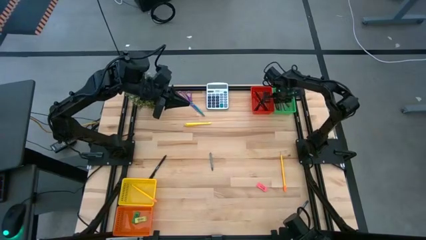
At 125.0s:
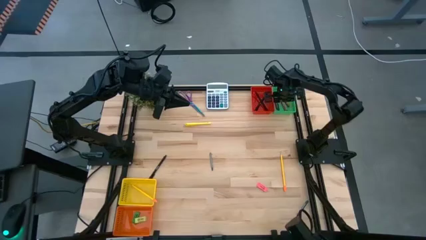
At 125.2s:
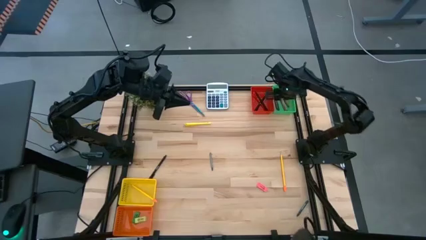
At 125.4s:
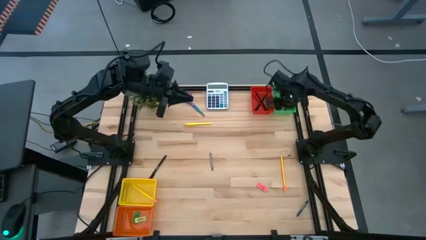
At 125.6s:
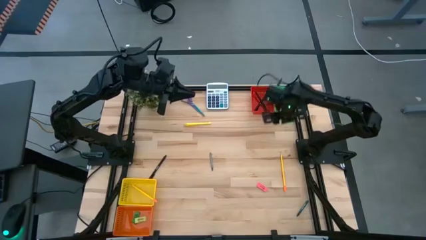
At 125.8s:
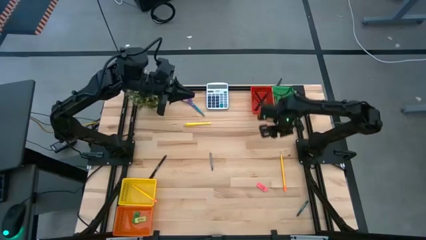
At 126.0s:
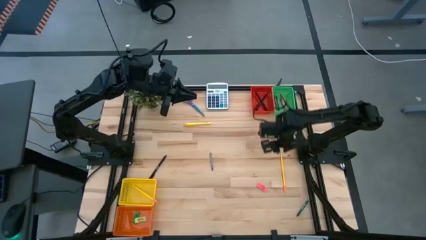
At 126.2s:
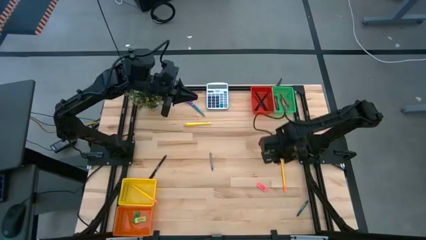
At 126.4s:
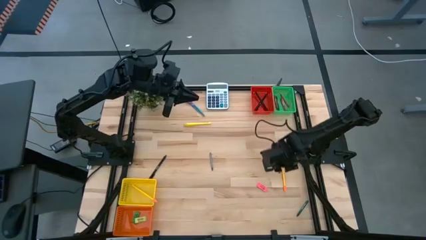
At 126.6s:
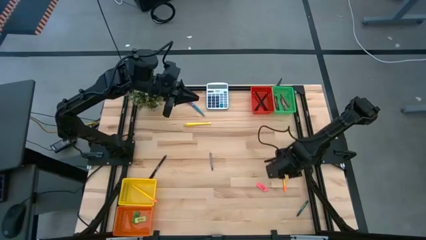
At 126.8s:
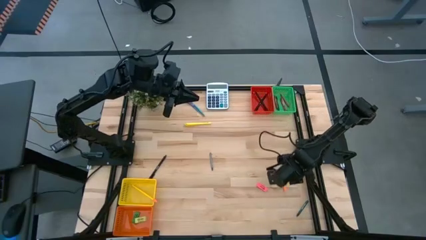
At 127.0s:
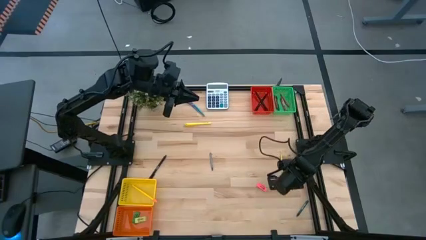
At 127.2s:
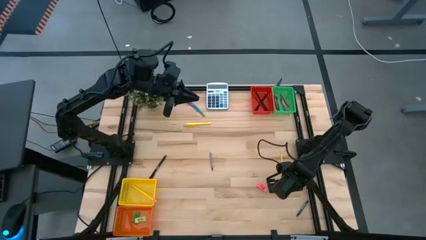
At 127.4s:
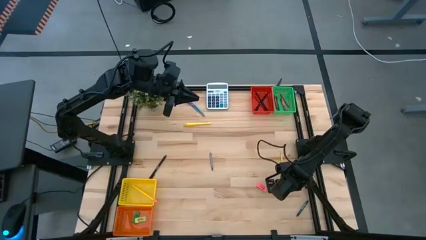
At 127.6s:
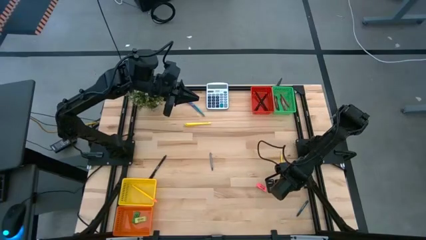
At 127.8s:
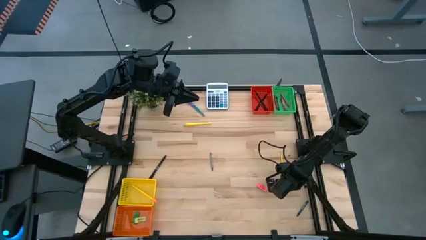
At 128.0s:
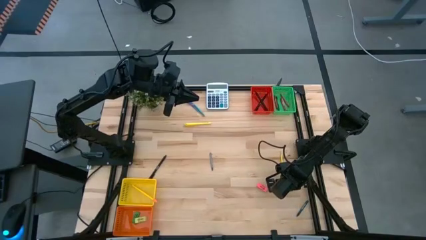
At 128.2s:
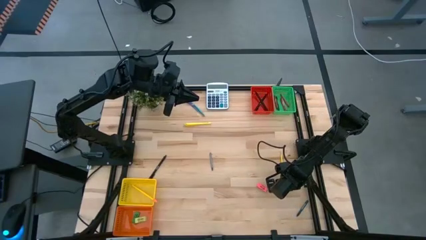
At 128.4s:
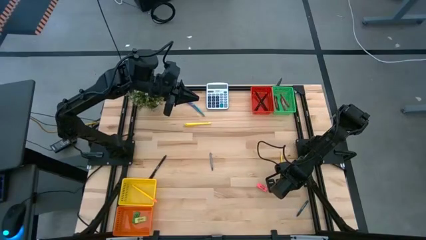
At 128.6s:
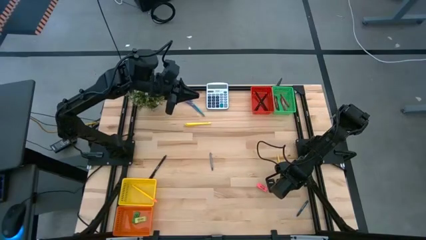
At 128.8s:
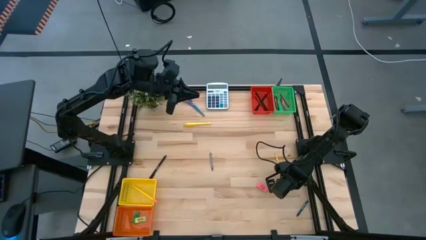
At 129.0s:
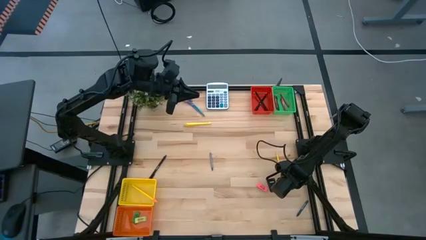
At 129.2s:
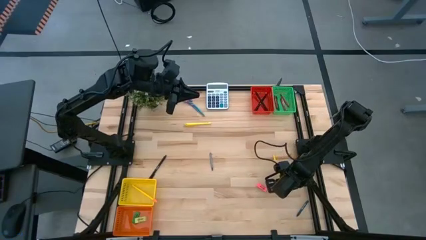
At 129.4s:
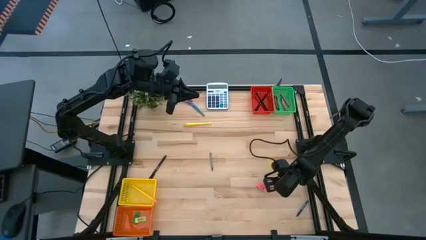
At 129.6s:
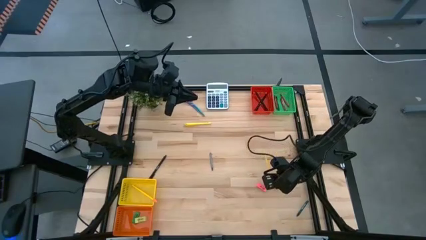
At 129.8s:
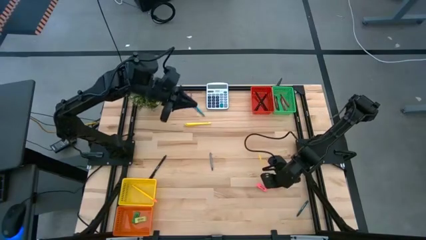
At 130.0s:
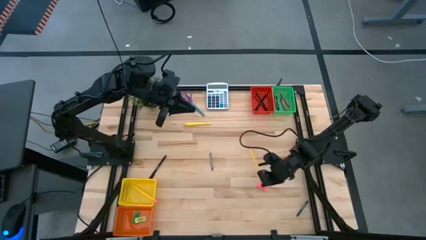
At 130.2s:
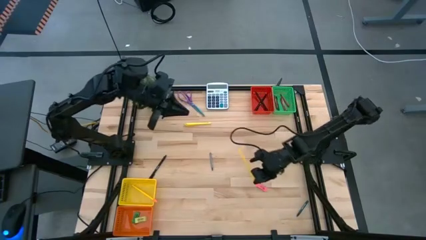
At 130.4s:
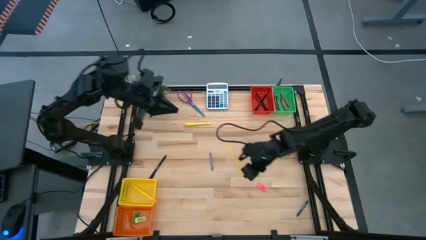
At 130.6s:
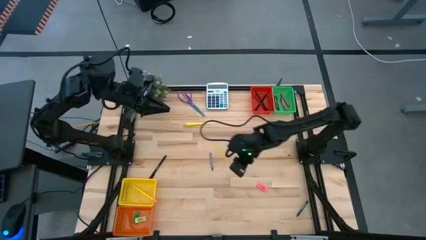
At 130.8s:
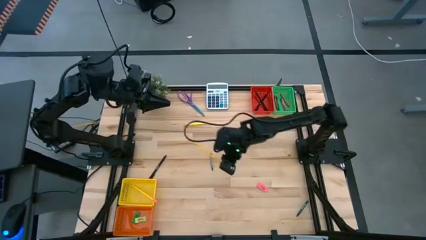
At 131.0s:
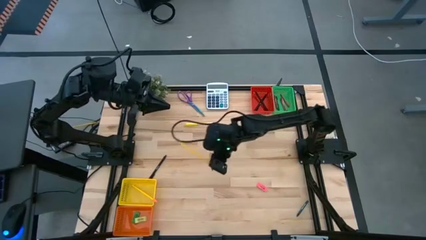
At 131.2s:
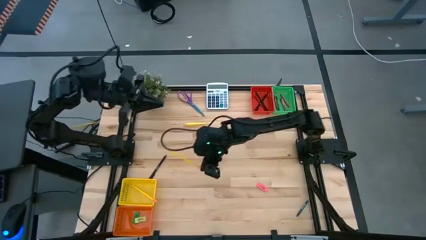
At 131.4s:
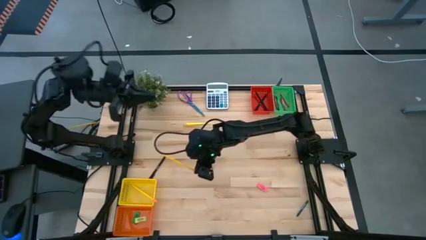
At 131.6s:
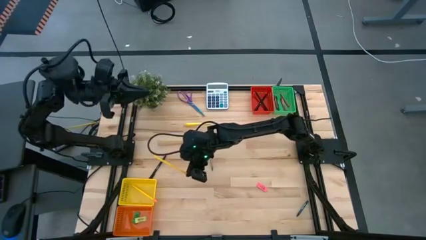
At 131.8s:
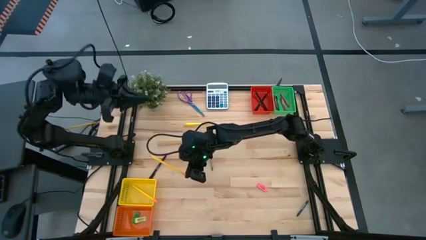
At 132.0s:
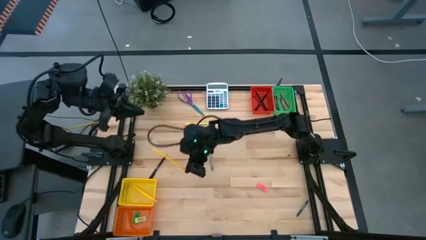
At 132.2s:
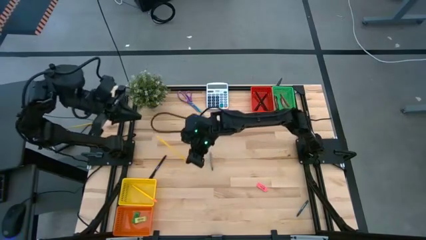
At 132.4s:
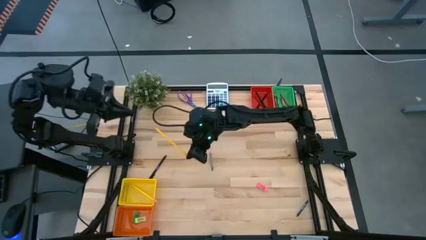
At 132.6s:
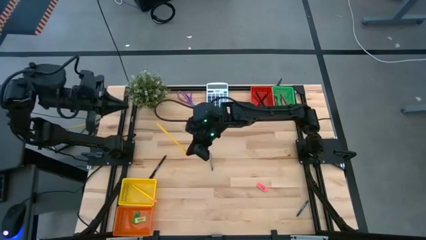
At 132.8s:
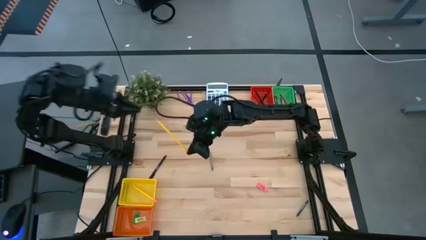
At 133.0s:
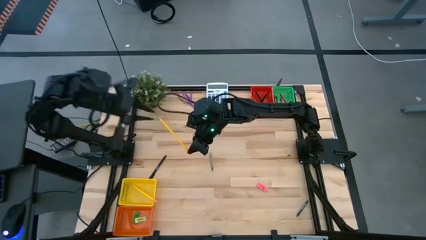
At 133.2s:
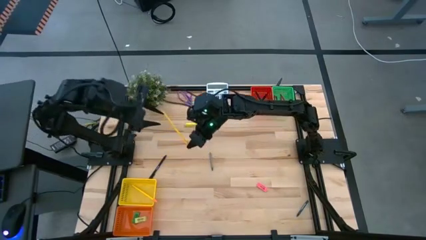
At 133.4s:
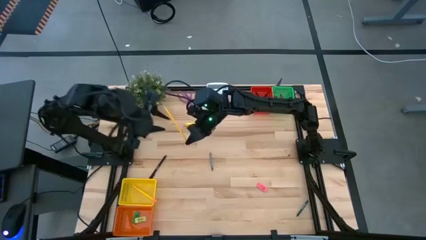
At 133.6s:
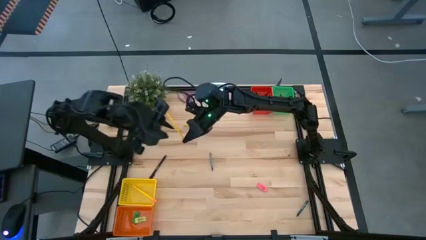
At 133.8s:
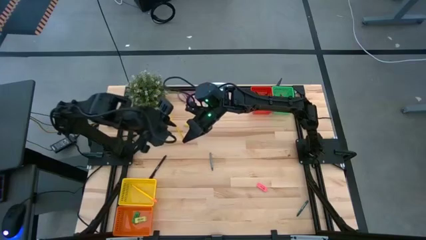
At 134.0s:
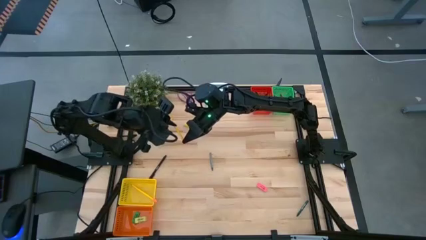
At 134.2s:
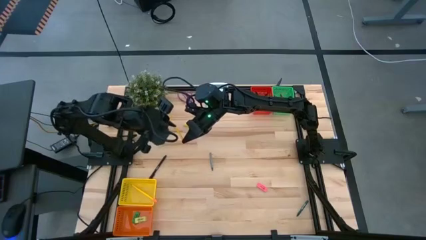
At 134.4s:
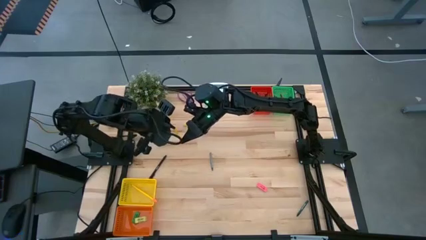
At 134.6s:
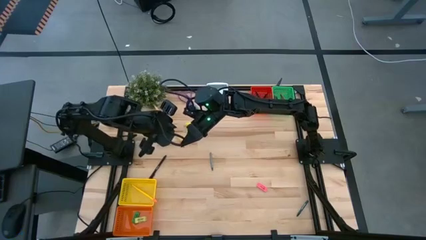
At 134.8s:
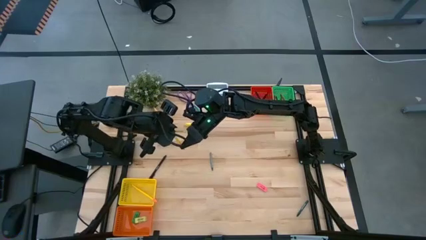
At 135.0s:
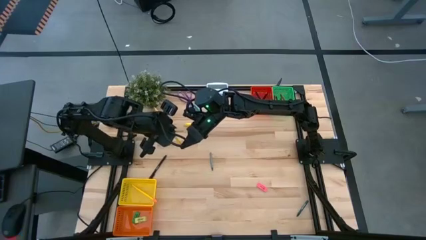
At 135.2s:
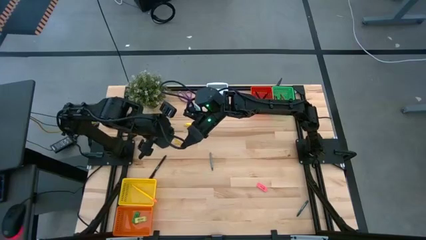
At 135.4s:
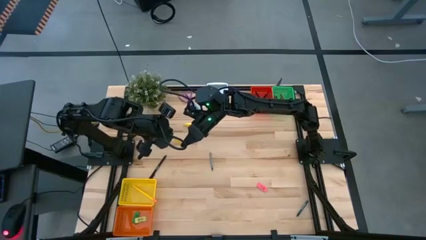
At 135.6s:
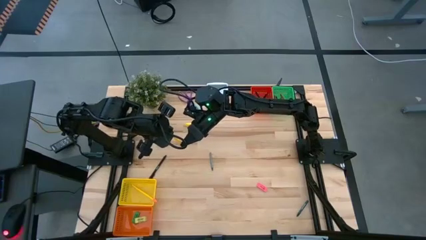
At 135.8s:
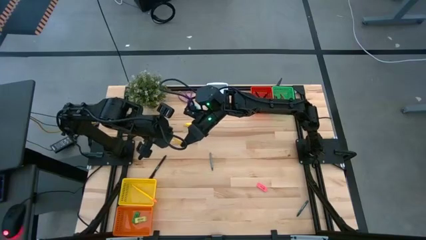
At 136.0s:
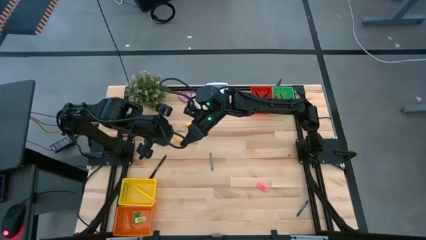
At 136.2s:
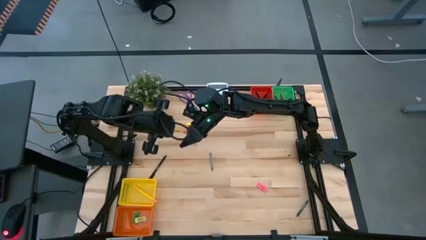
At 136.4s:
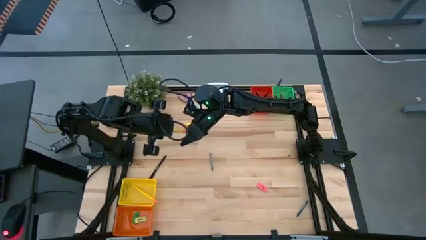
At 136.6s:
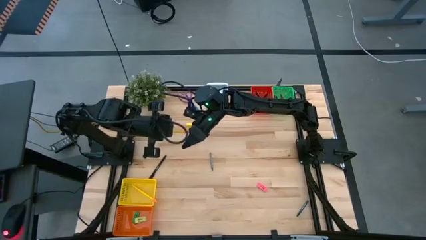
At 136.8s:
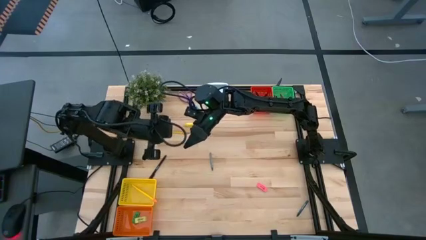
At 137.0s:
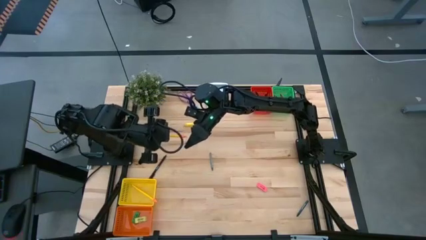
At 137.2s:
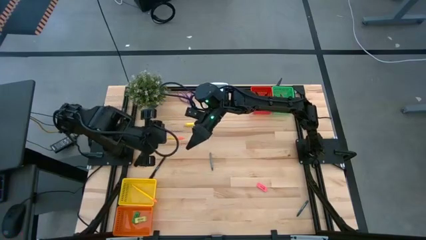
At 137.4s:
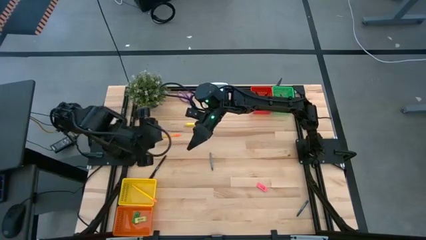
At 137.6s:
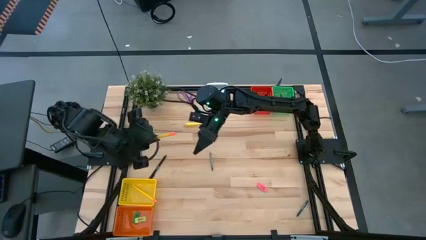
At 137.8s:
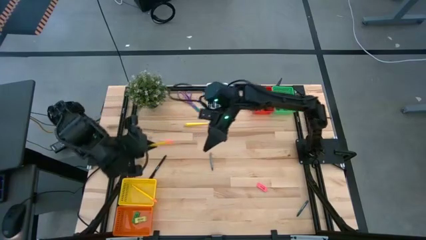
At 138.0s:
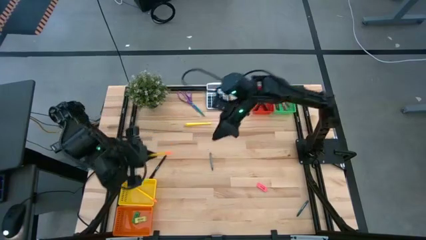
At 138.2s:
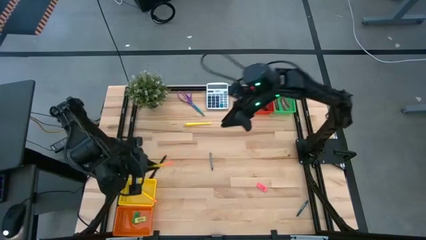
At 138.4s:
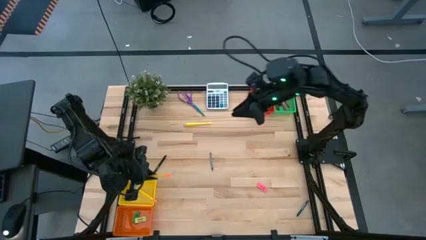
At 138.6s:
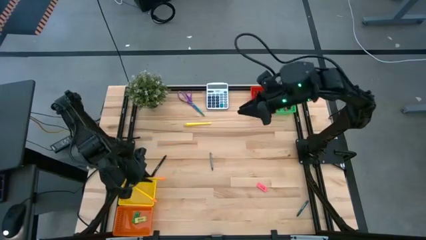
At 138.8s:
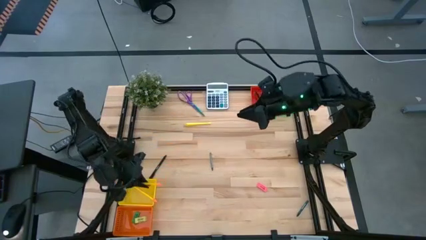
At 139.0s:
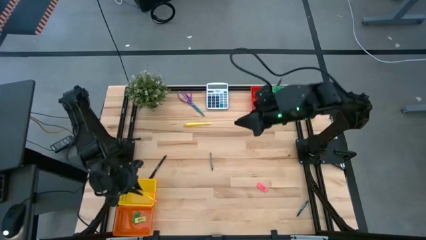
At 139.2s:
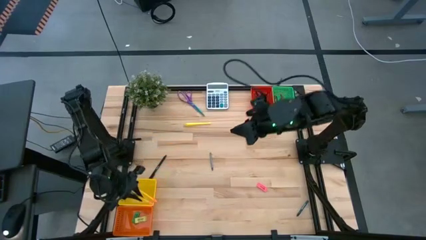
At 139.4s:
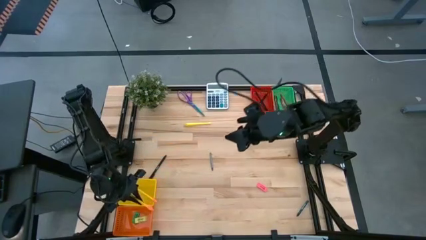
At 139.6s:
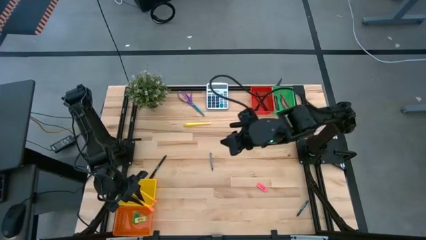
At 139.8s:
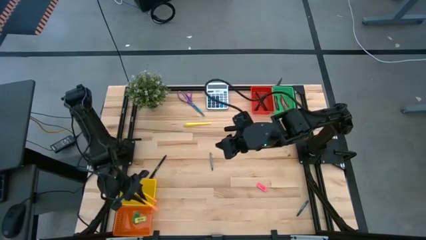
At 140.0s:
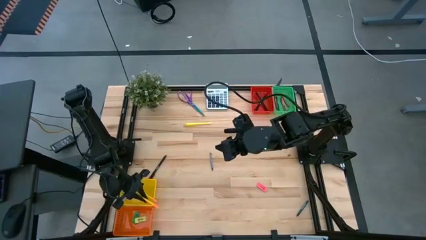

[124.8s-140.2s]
Task: Sort crayons/erasers/pens/pencils in bins
Put the yellow pencil into the yellow bin
